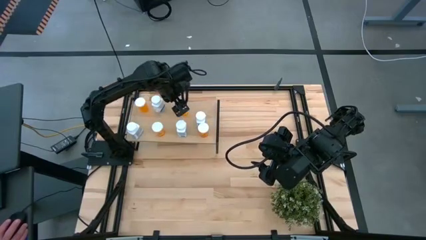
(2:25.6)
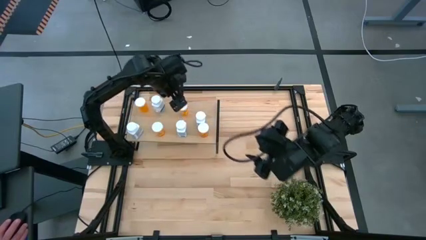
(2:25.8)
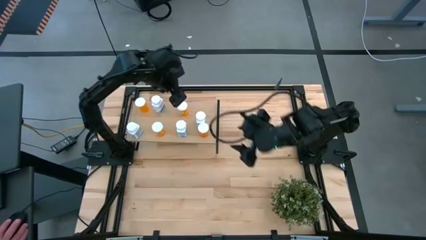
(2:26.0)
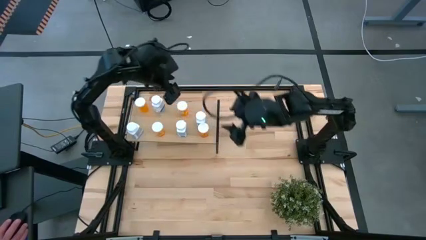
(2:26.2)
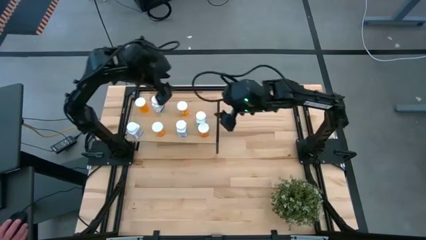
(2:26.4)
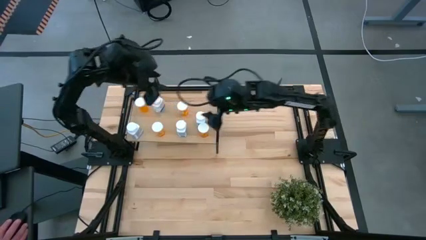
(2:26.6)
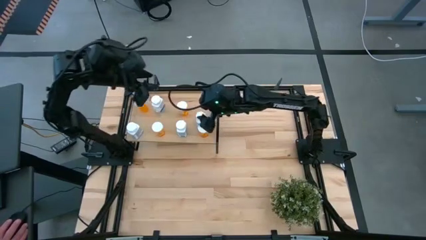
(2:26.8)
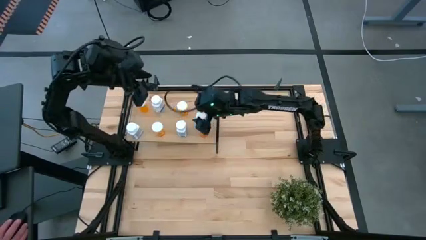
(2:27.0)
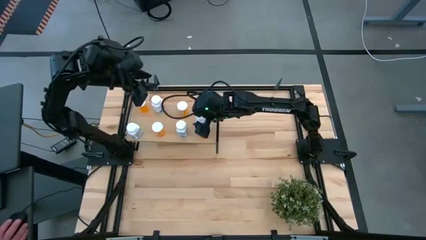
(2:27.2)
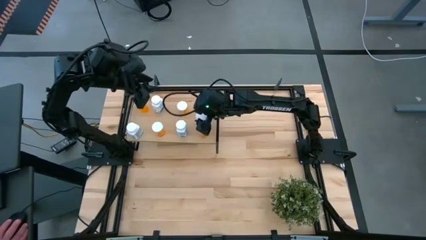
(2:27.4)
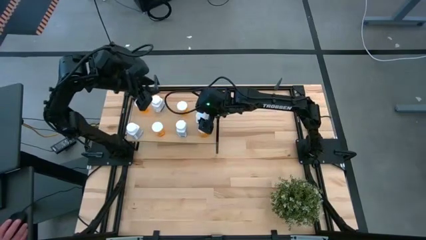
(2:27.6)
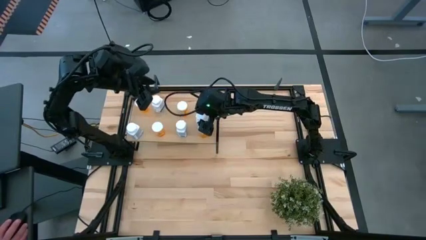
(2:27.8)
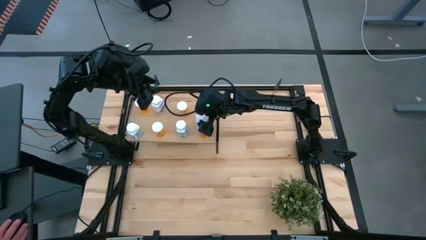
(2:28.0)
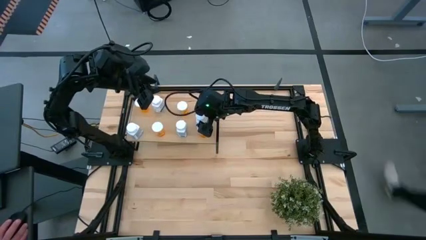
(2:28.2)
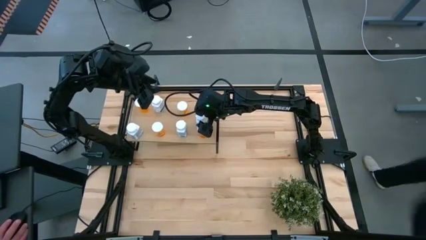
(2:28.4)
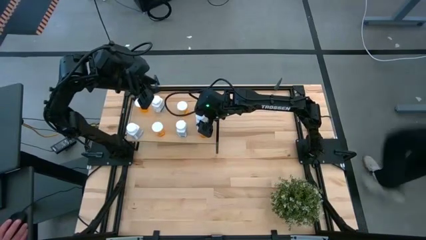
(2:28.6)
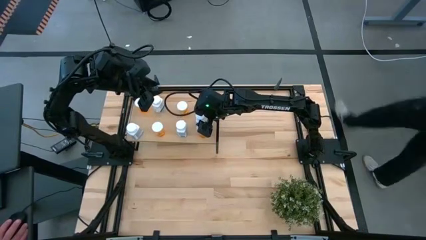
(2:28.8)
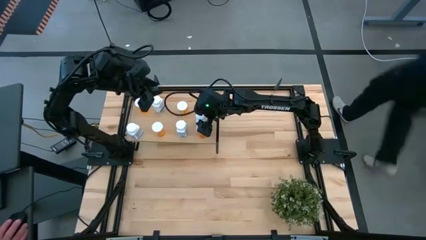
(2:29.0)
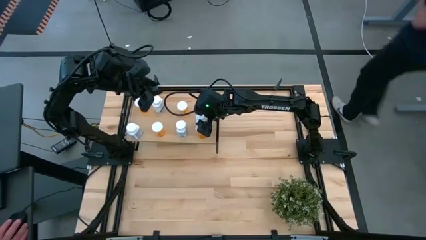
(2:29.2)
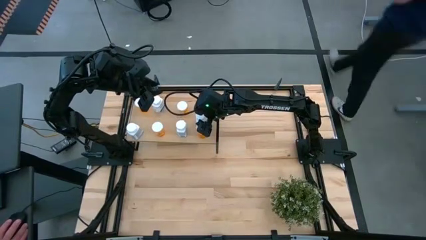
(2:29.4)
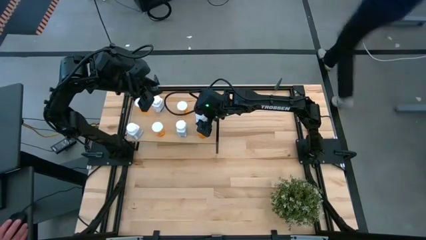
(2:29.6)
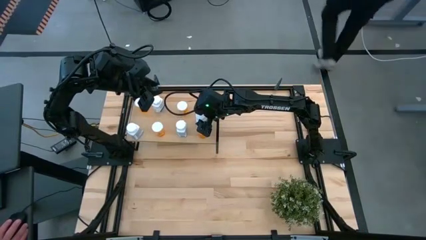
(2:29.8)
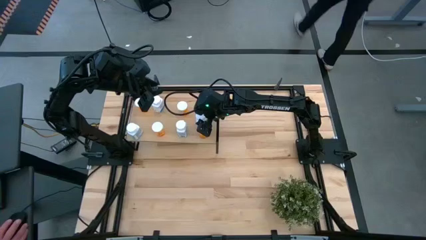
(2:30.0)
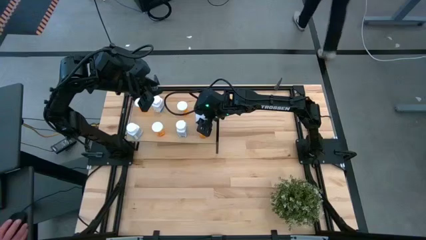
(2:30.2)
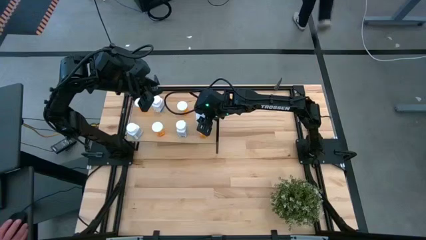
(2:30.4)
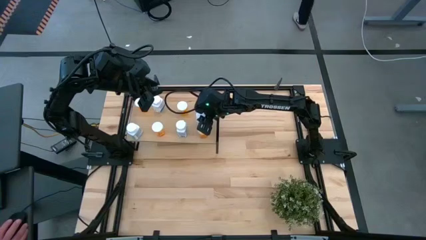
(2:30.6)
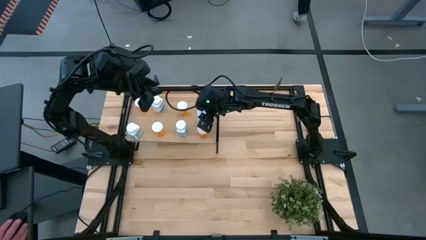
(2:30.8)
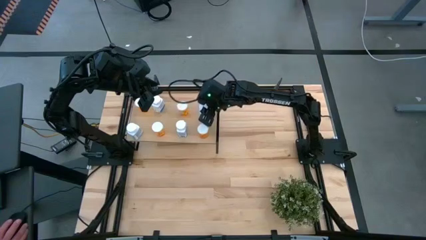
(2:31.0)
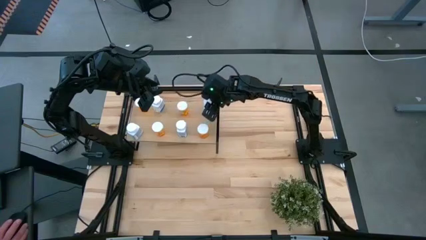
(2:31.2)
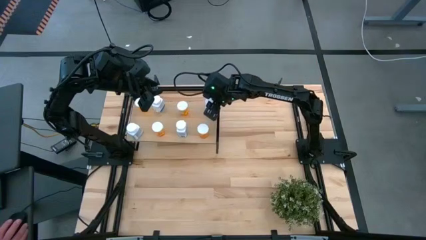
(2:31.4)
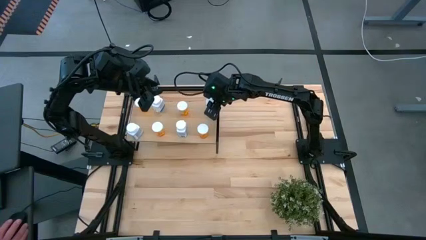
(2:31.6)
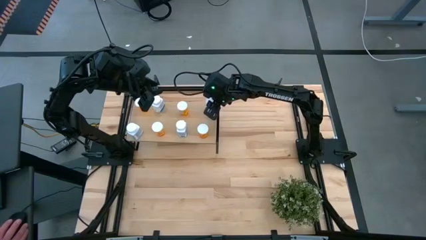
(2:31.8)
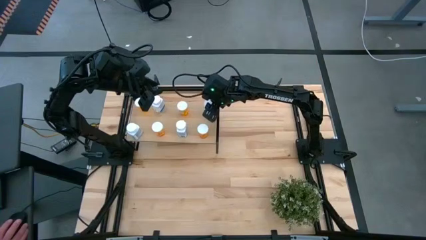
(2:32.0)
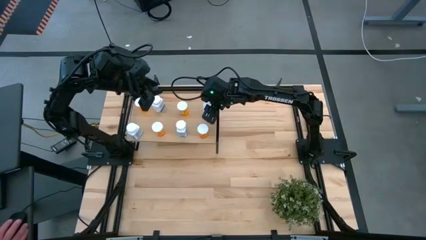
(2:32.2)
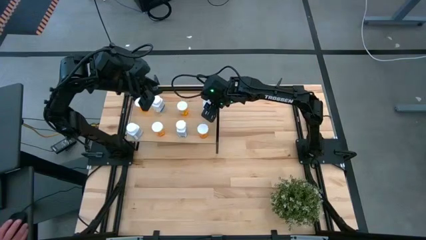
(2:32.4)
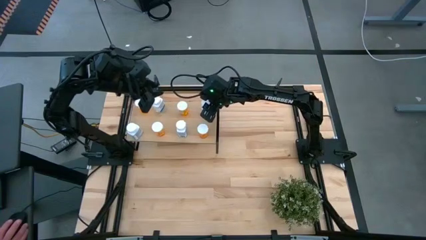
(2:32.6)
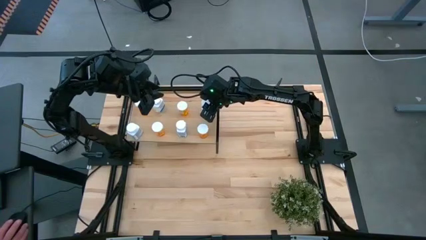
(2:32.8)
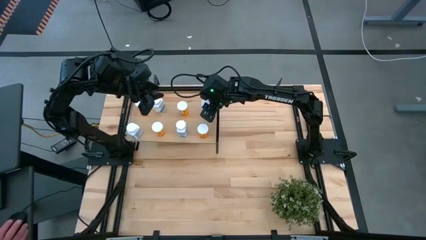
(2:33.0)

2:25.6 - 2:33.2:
Task: Pick and place medicine bottles onto shelf by color
Adjust the white pill bottle on the shelf

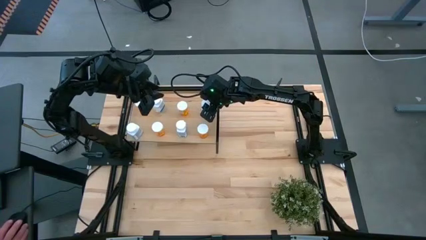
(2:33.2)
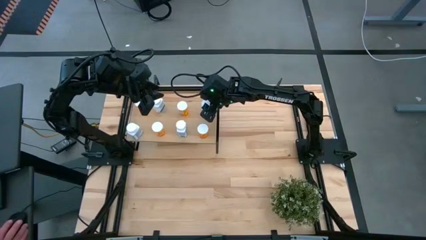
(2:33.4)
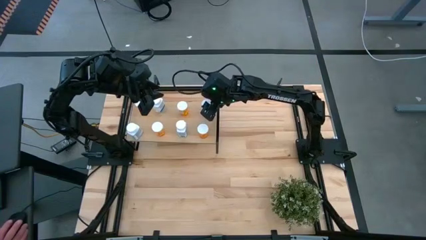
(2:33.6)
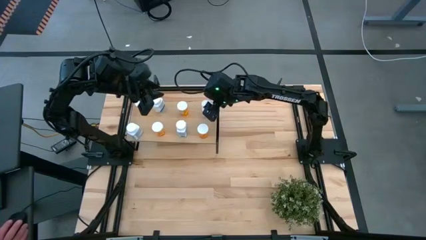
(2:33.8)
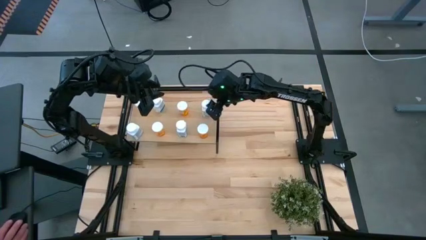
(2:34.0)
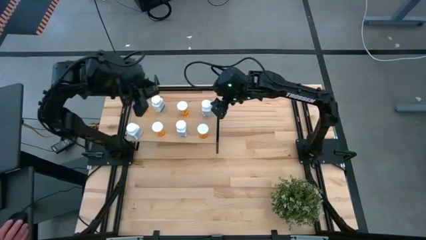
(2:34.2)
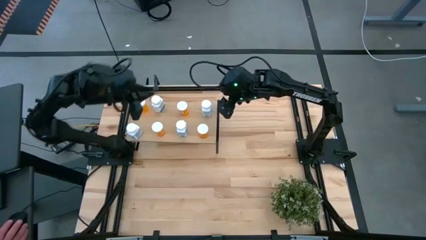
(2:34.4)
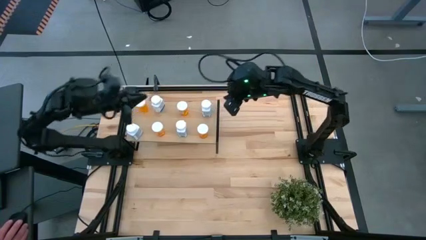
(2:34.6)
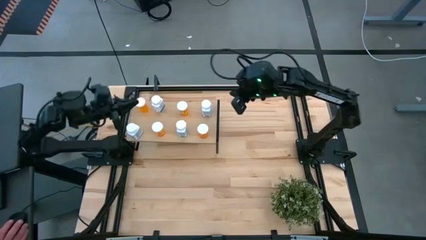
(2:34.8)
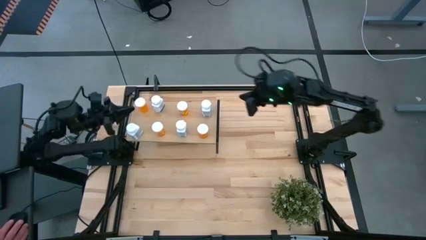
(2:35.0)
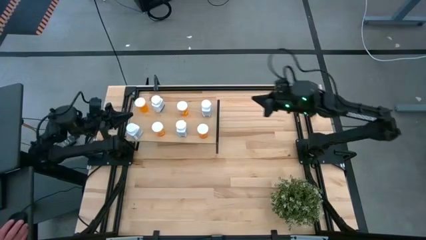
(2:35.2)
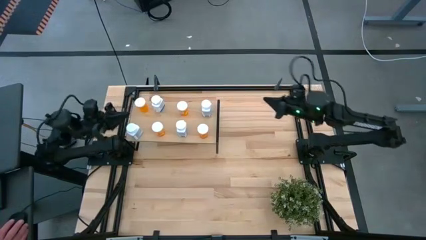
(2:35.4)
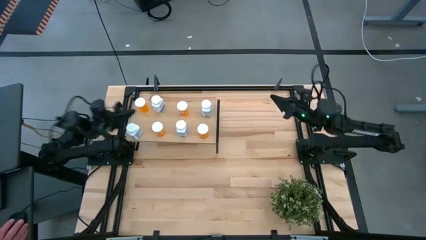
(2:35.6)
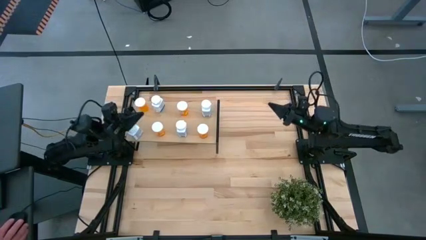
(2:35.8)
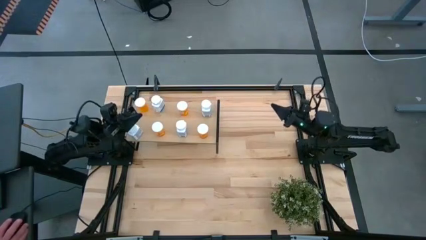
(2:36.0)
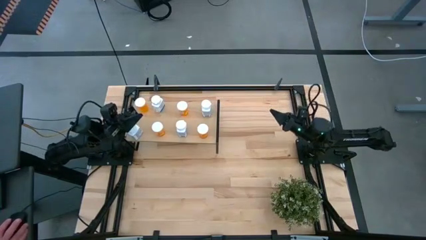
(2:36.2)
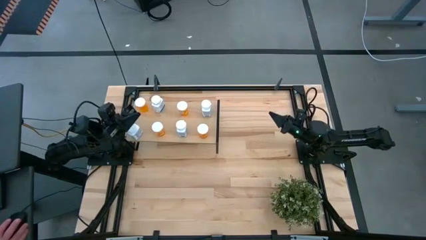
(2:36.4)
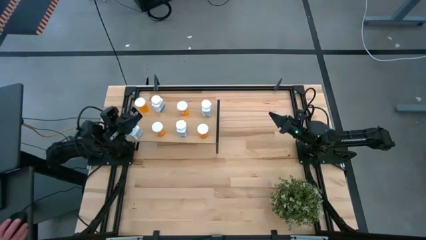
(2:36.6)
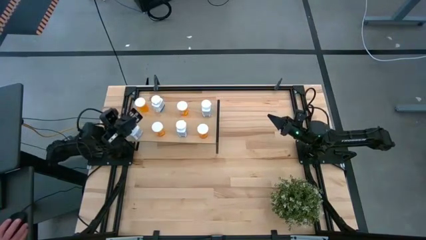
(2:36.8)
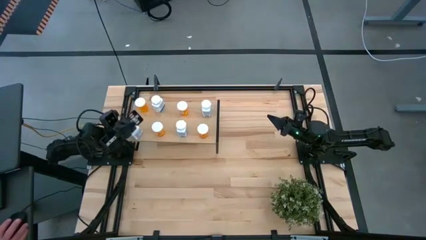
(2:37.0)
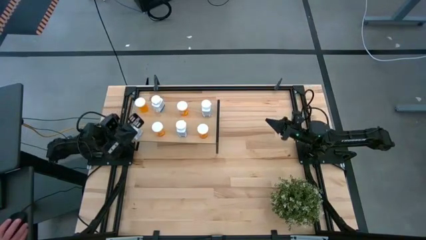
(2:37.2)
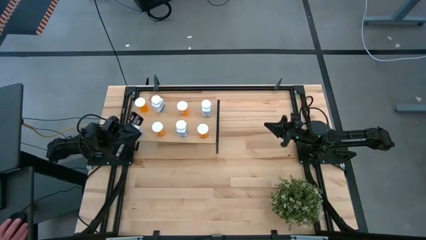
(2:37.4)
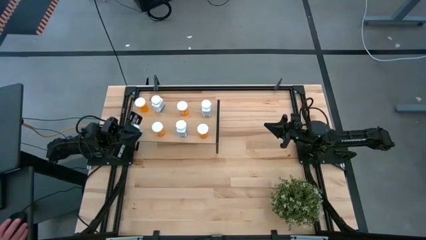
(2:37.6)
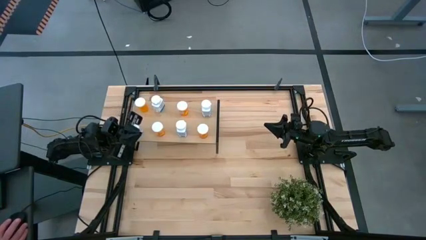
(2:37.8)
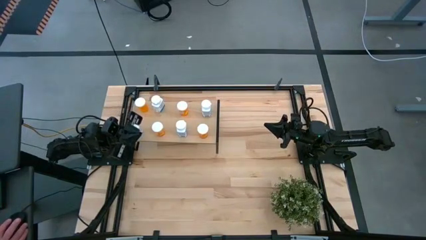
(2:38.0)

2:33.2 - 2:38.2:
Return to Home Position

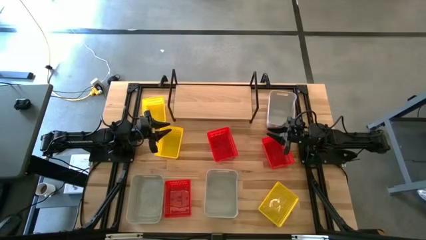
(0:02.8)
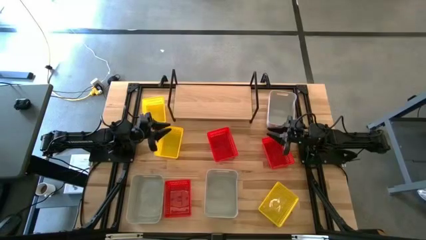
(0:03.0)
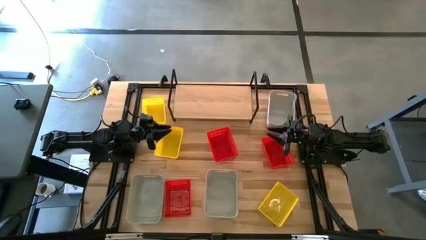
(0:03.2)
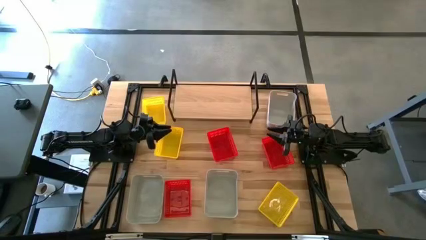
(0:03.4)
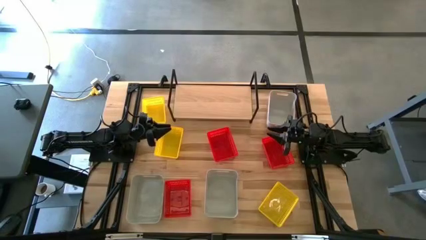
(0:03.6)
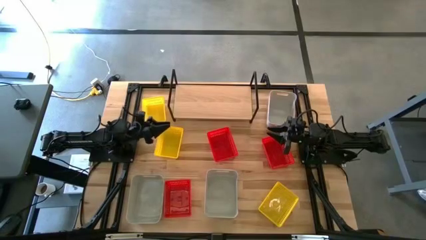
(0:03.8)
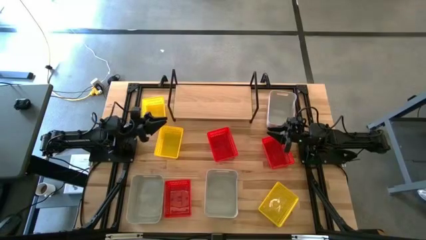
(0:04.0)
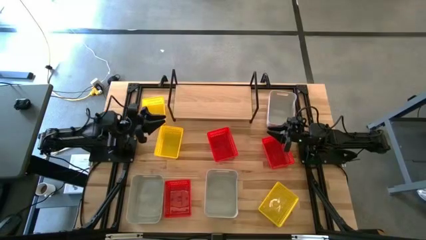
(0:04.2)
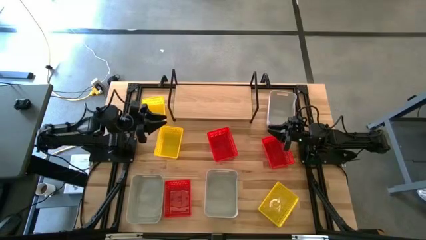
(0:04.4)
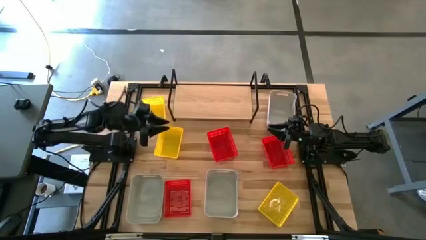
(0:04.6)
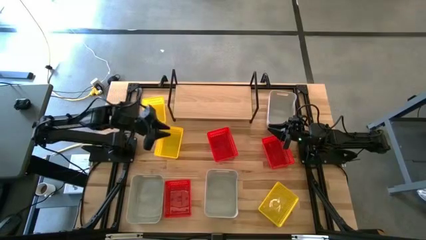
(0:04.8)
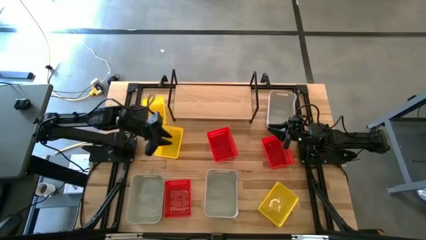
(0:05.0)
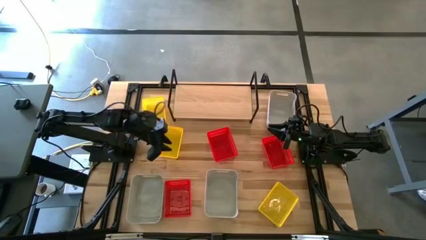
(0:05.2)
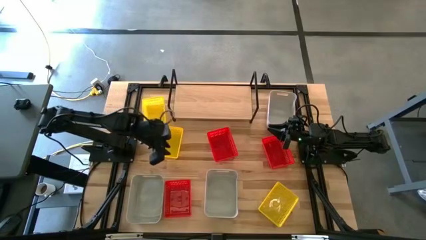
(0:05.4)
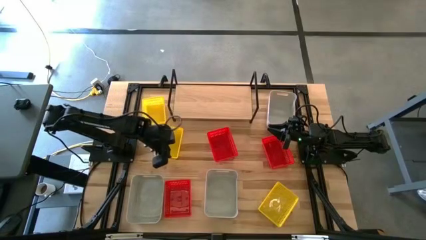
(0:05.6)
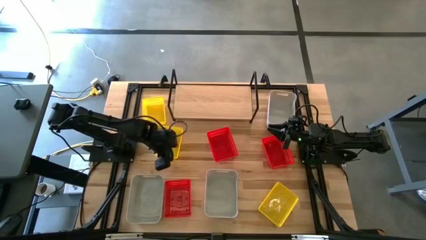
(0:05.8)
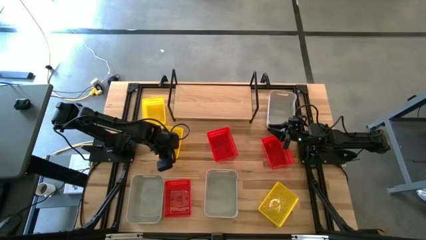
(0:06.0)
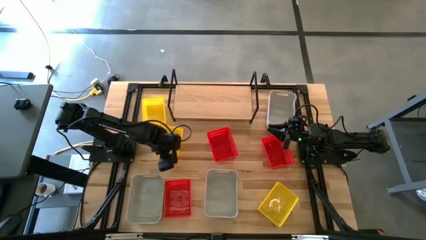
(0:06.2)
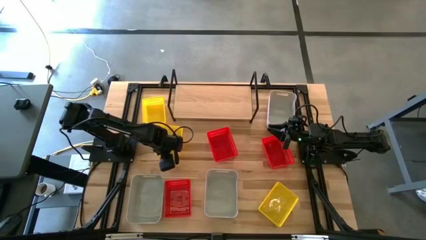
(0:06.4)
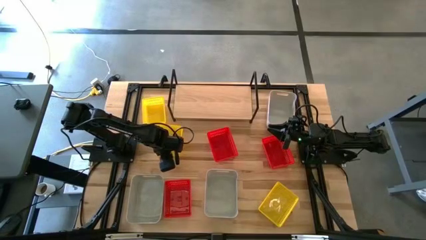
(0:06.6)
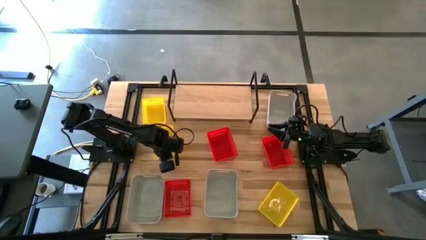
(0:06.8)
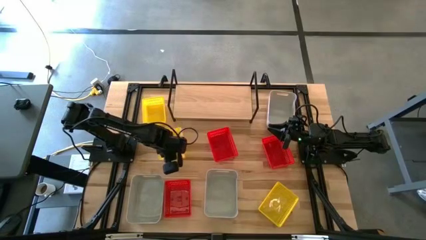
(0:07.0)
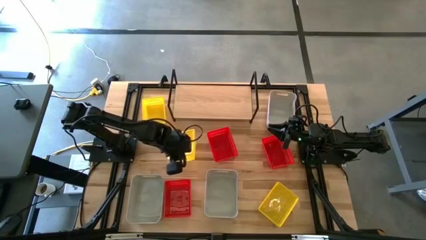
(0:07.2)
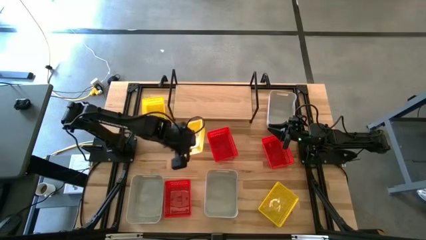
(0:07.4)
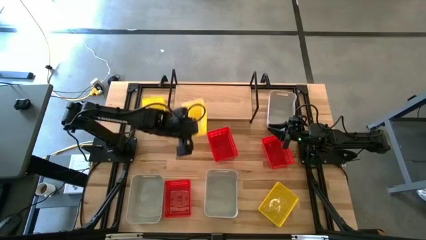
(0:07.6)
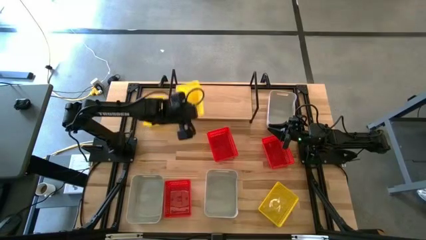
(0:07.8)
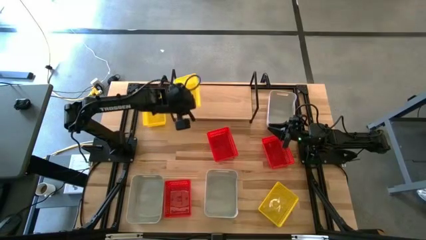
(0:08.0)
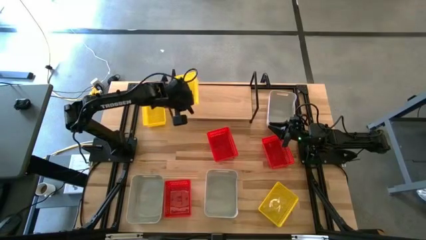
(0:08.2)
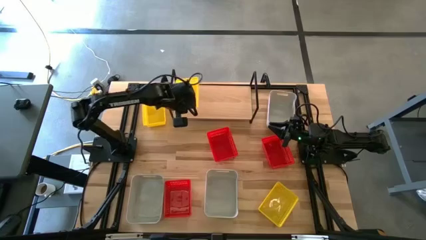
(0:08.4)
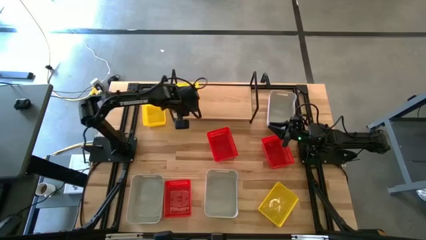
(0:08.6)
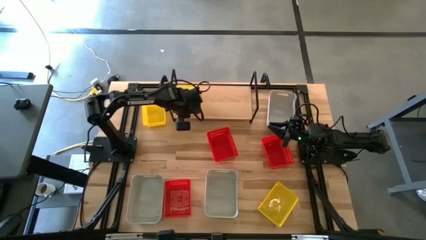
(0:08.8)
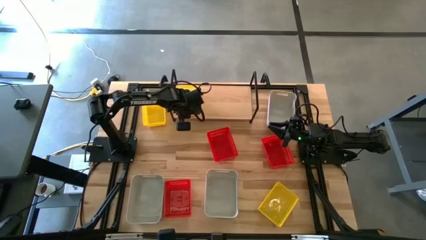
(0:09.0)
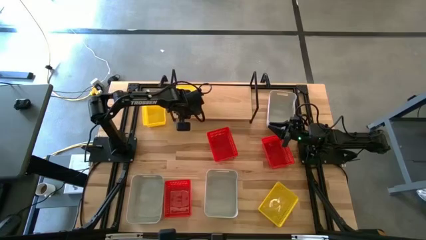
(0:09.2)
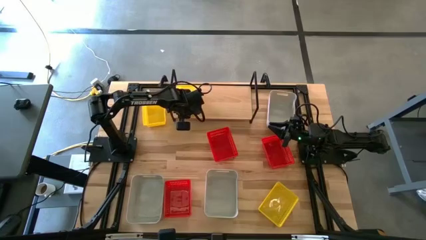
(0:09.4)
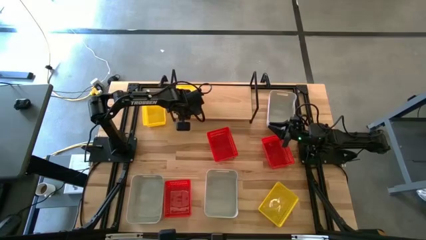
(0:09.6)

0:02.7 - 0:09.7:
Task: Stack baskets on shelf by color
Put the middle left yellow basket on the shelf
